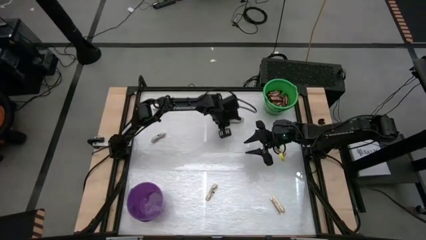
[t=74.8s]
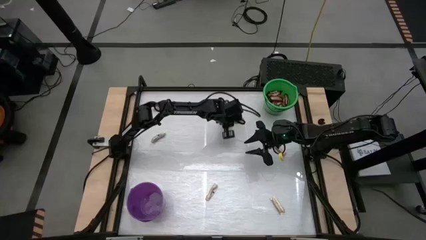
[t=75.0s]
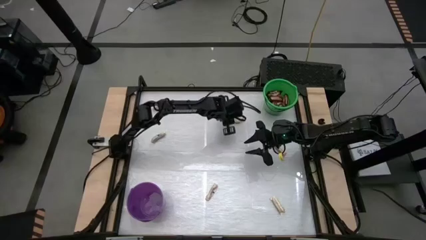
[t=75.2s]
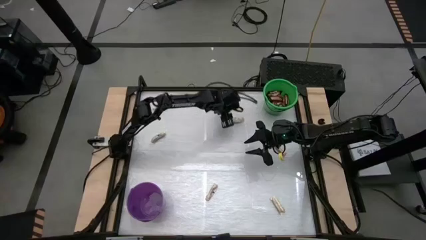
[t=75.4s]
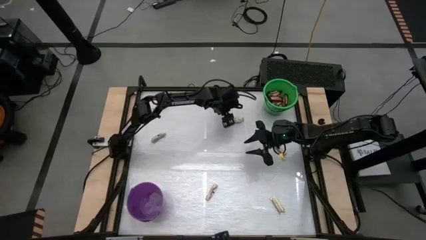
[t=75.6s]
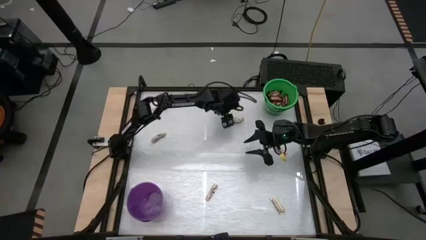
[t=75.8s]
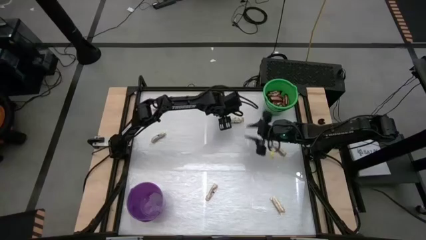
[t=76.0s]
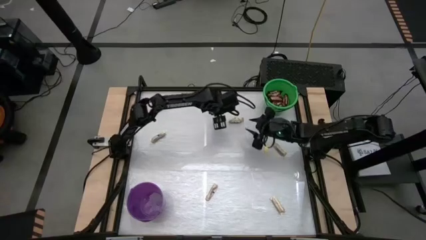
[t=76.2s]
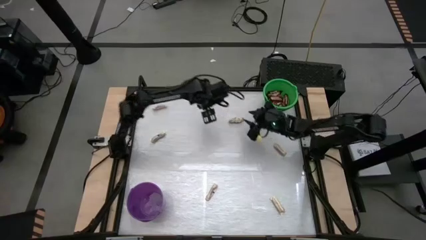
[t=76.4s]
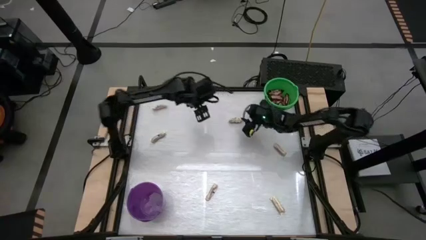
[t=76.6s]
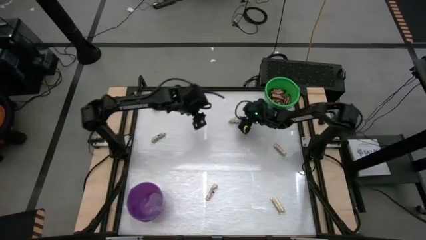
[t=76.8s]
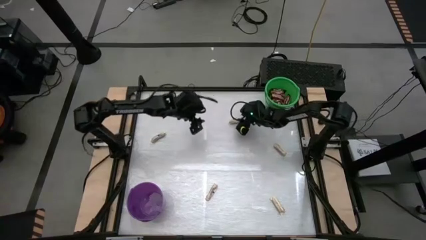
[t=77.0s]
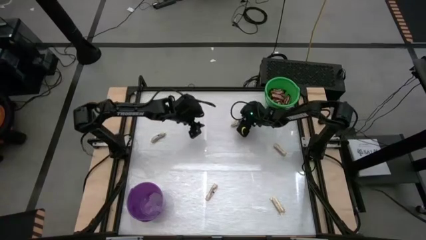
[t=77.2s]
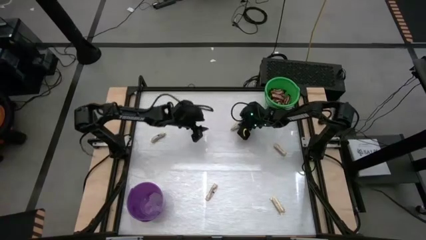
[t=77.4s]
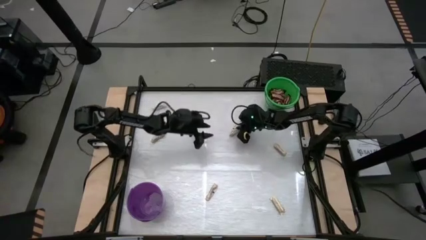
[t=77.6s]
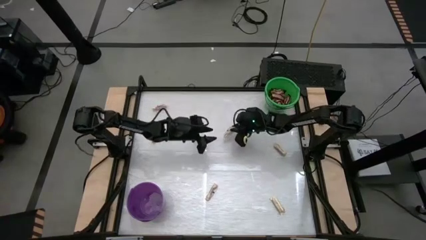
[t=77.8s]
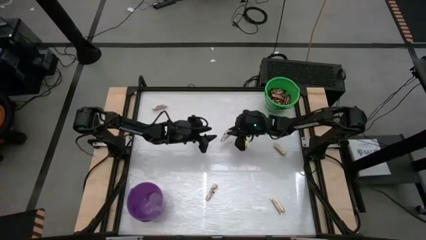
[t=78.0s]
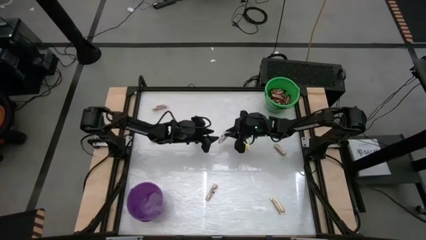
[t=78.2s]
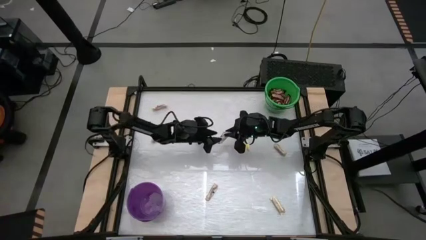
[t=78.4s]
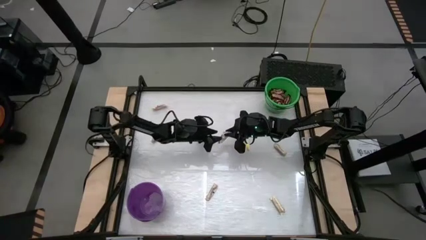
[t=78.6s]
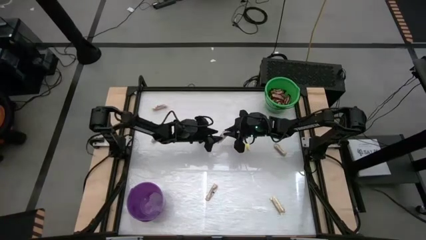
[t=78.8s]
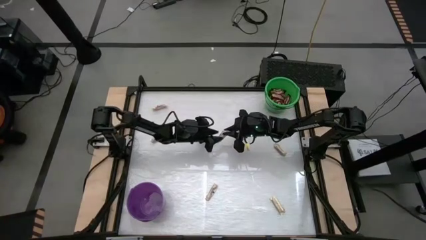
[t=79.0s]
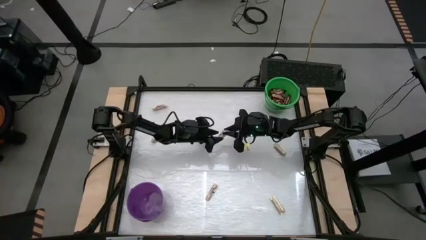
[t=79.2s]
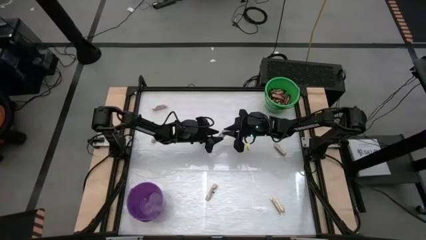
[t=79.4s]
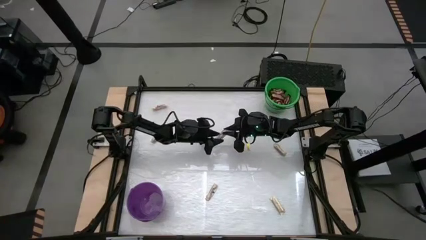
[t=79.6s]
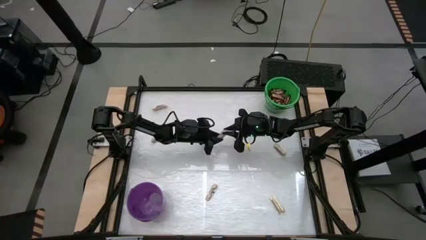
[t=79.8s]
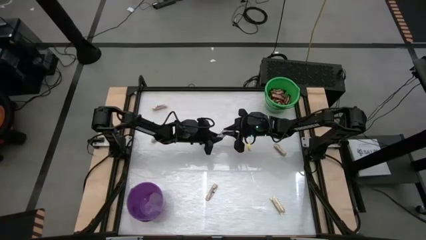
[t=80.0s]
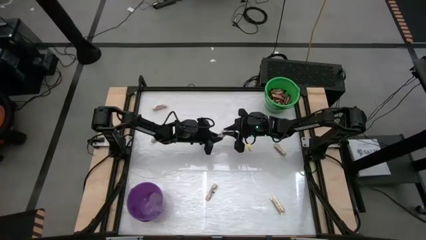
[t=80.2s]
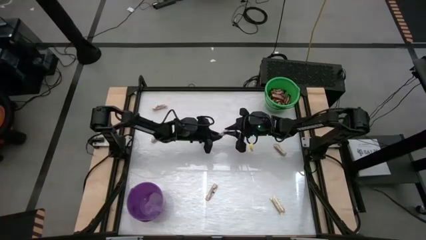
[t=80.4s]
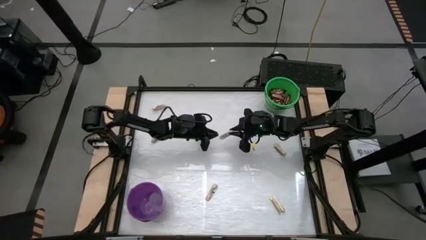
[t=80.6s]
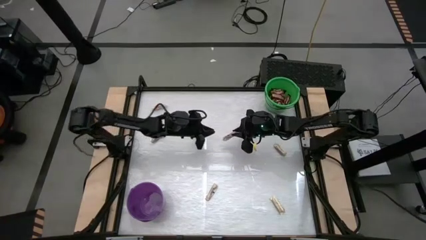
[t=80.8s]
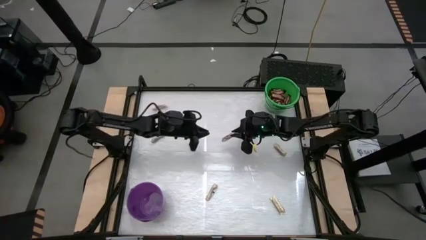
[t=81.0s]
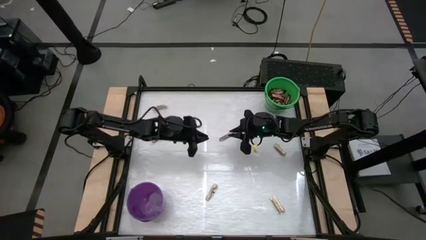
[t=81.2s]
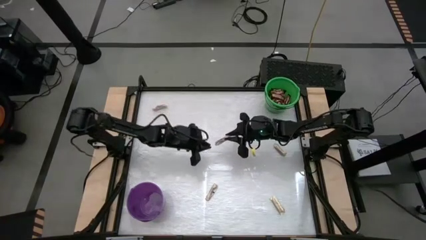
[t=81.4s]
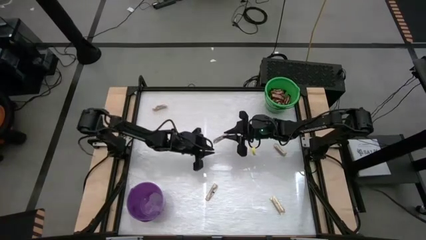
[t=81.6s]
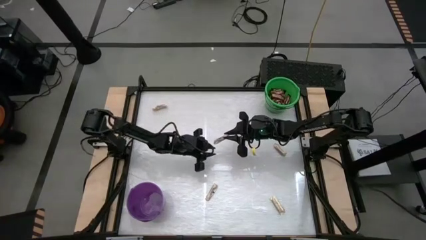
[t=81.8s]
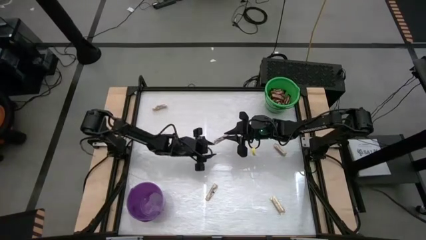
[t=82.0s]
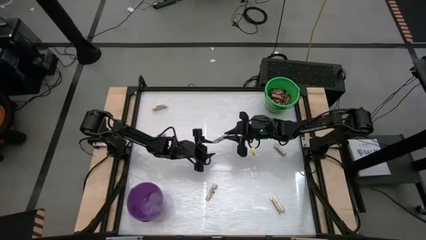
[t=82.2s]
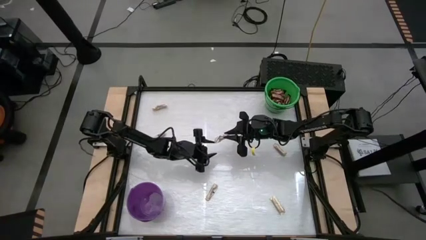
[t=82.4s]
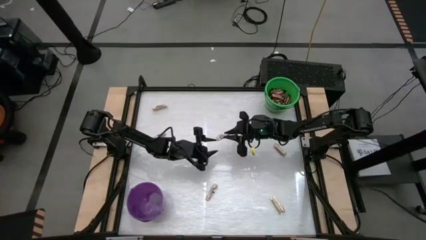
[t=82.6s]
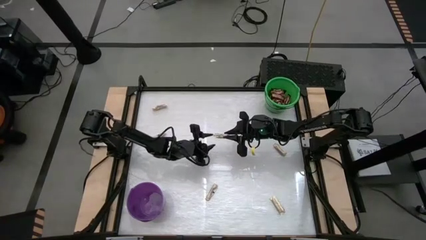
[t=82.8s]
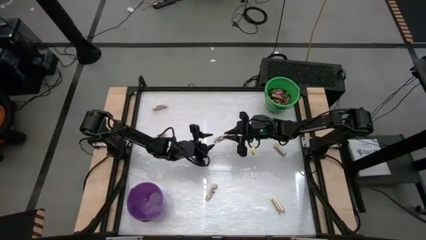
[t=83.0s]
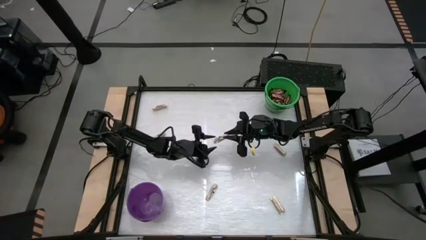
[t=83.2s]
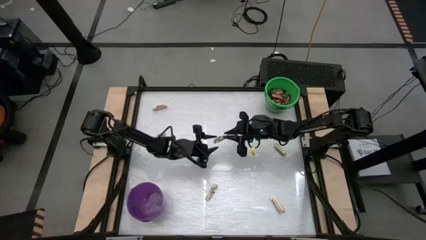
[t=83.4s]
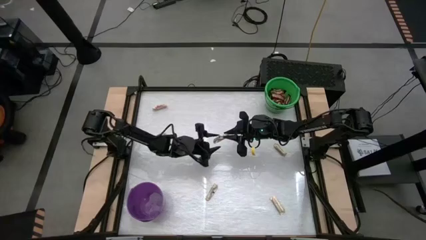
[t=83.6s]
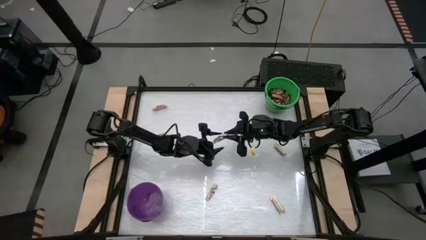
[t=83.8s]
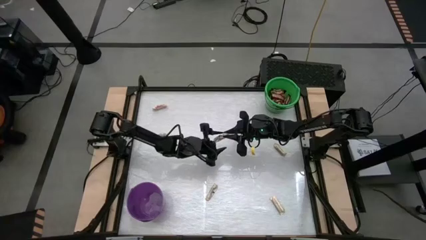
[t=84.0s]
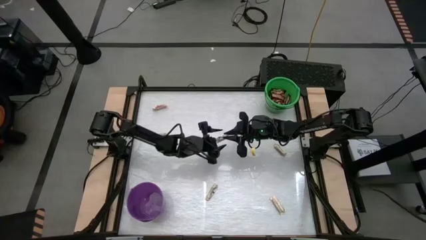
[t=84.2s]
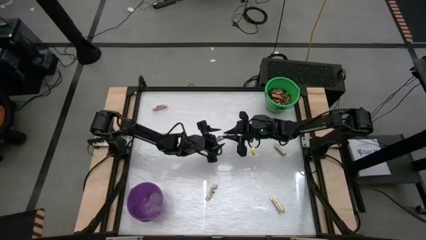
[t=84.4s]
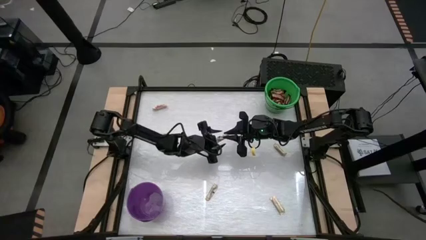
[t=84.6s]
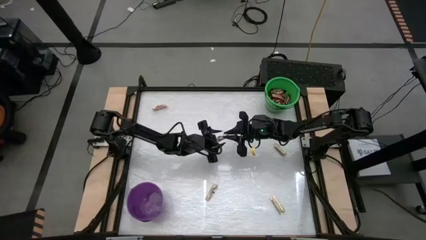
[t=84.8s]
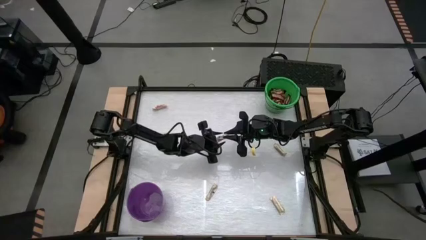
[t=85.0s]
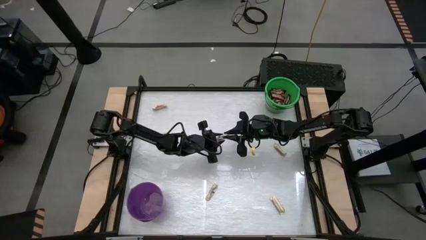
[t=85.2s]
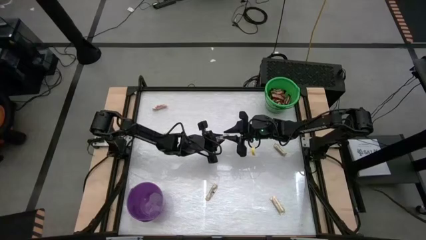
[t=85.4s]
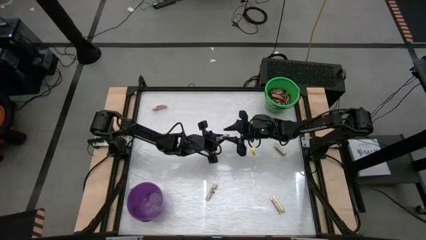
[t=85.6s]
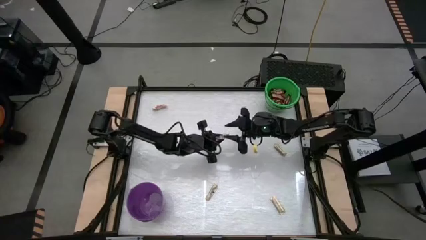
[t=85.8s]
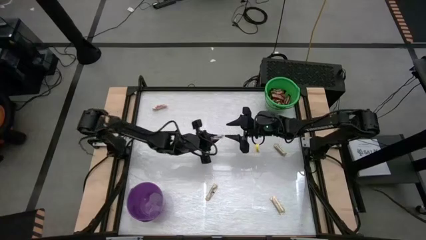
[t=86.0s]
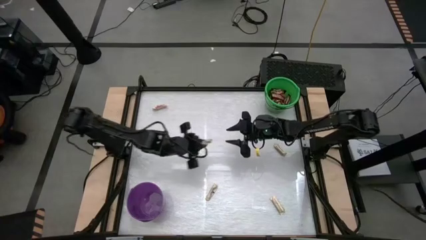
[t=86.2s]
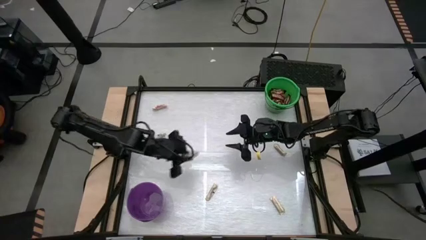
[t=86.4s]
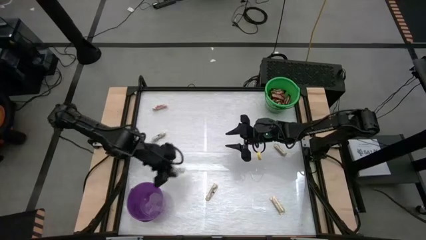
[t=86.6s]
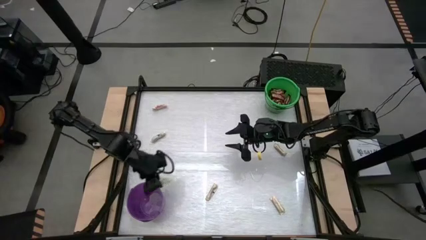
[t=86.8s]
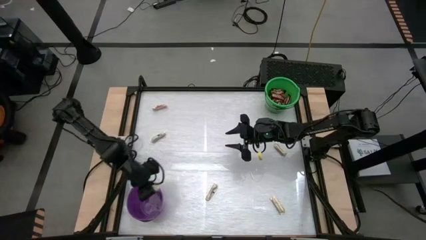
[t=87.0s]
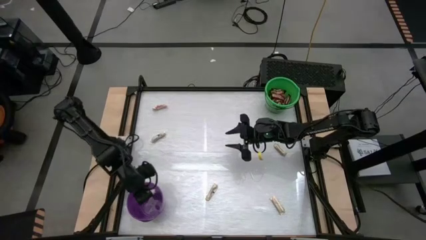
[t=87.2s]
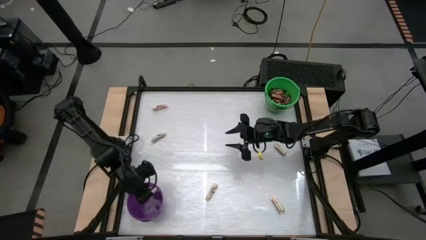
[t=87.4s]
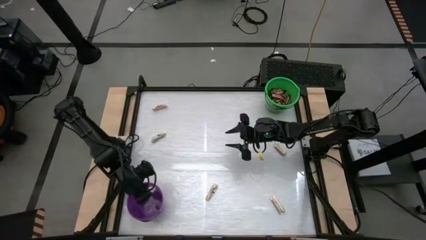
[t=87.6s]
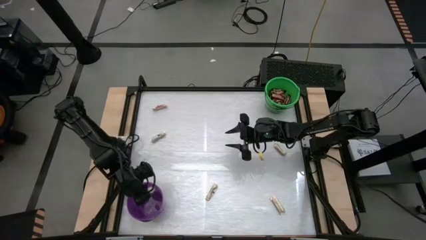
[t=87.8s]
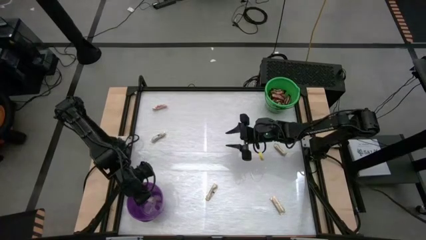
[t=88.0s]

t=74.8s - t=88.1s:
Task: Sort candy by brand, put in halloween buckets
Put the white candy bar into the purple bucket

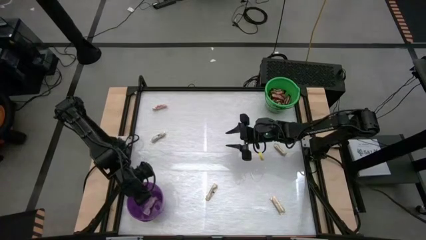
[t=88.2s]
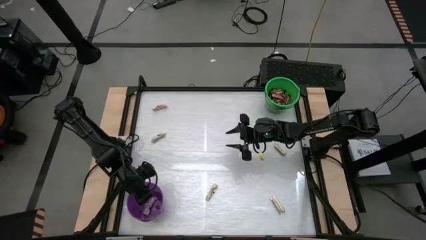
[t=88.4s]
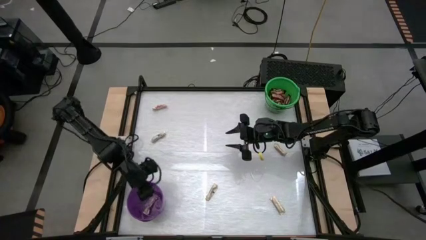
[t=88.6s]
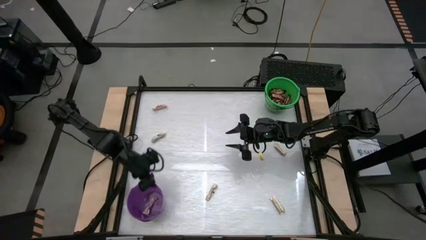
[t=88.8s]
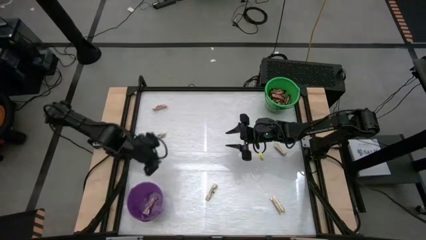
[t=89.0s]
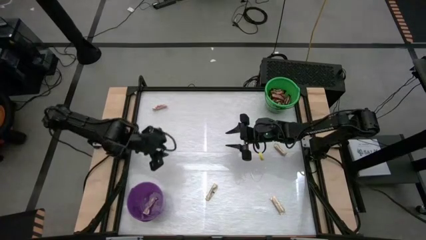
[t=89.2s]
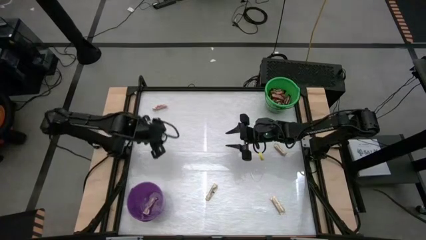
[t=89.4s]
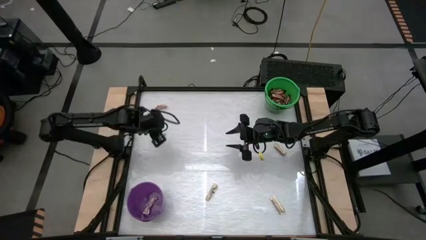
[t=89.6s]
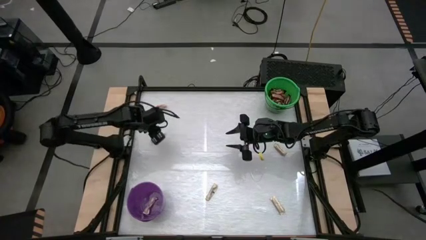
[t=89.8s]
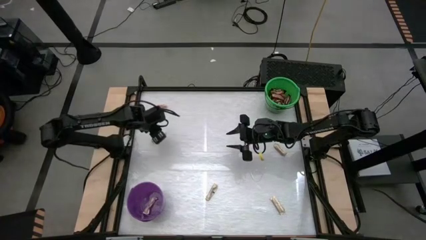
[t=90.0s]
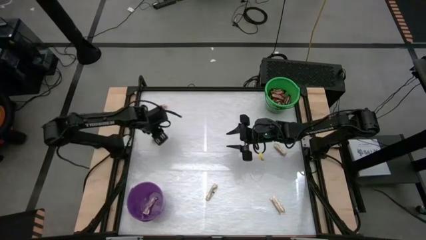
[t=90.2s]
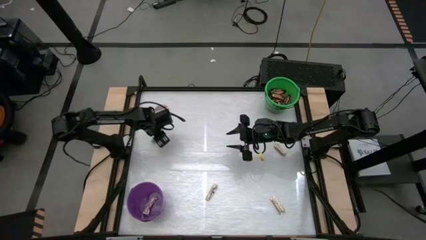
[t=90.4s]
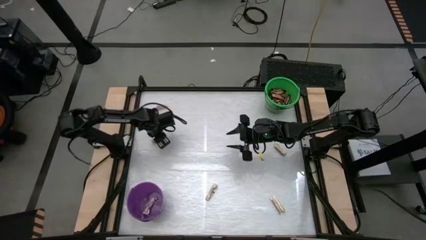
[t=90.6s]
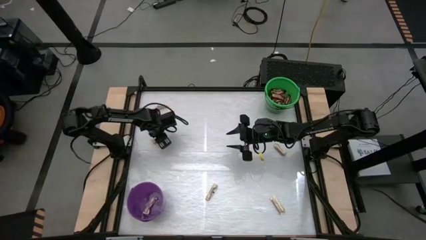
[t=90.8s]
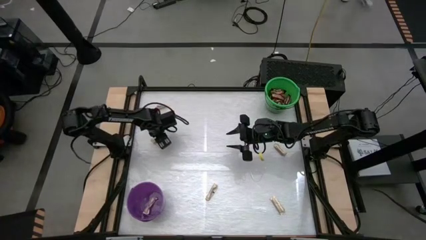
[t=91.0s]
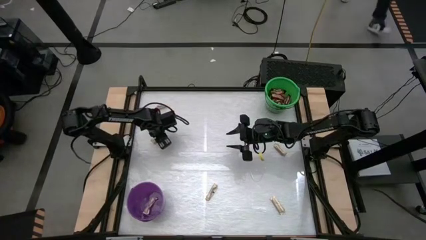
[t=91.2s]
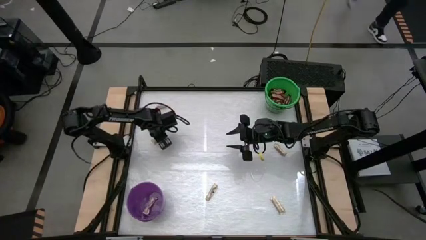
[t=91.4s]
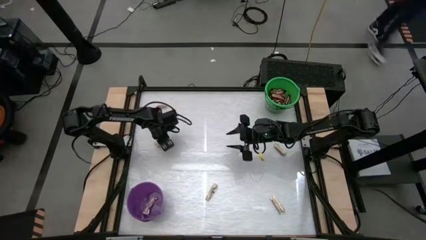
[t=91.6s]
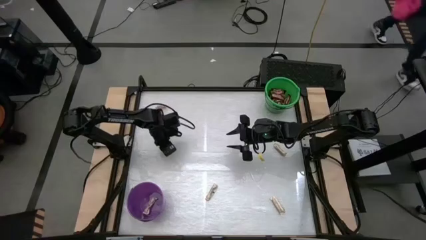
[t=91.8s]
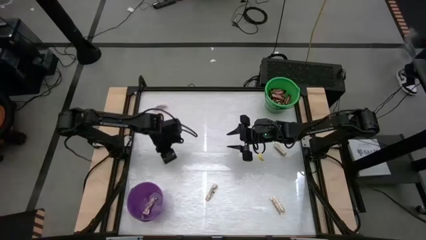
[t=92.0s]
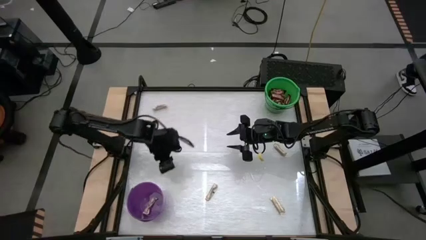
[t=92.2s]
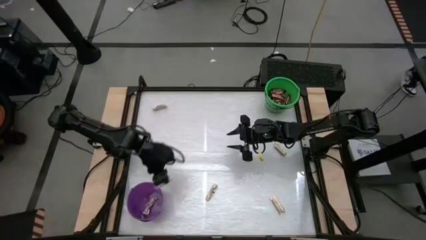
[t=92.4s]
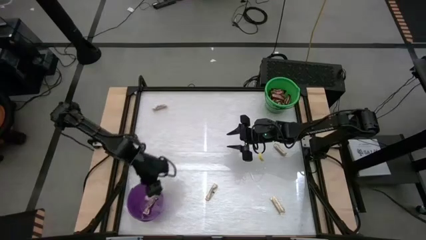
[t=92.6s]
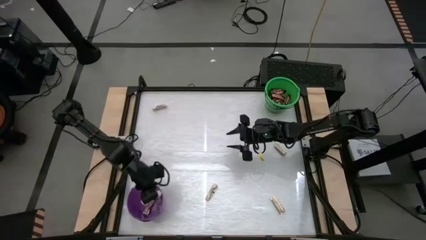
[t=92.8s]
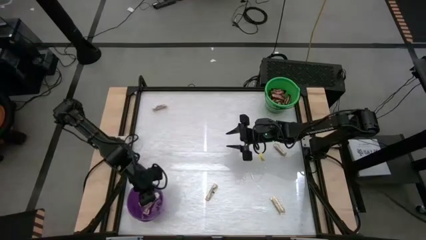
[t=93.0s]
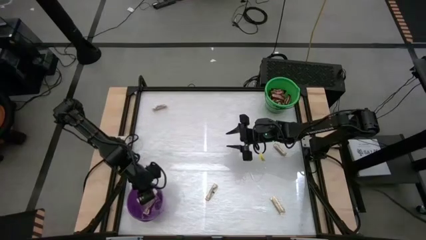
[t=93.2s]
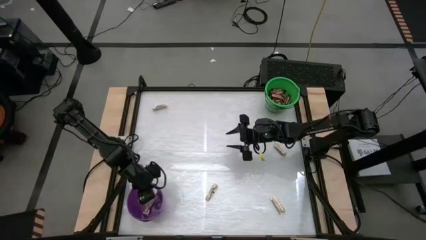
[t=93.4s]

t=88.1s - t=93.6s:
Put the white candy bar into the purple bucket
